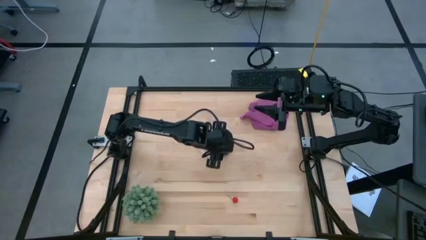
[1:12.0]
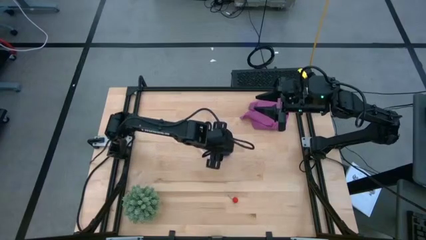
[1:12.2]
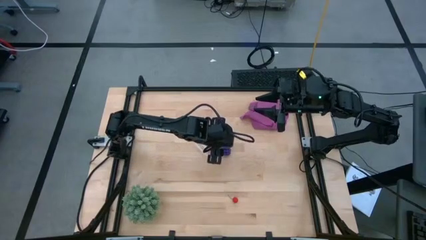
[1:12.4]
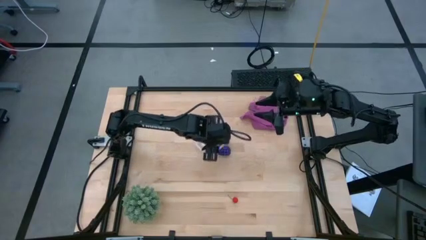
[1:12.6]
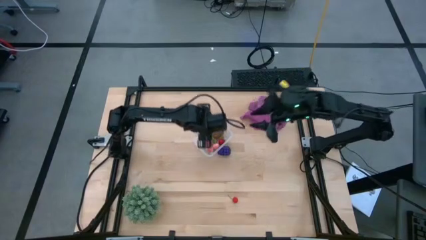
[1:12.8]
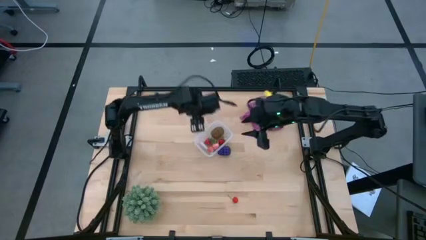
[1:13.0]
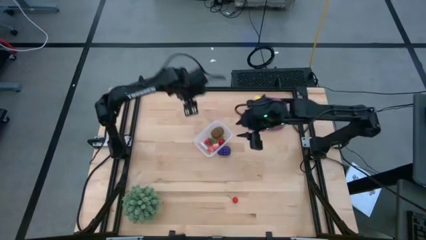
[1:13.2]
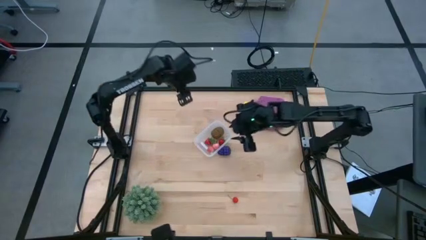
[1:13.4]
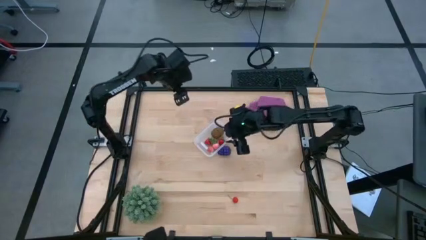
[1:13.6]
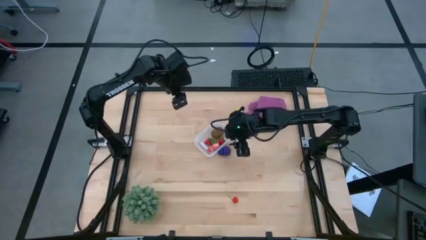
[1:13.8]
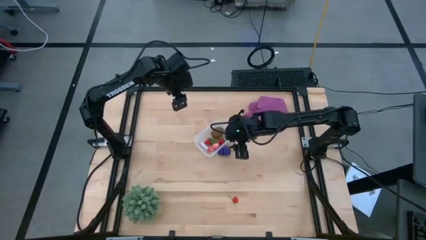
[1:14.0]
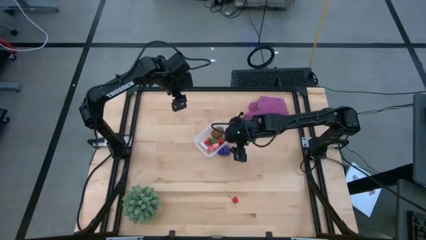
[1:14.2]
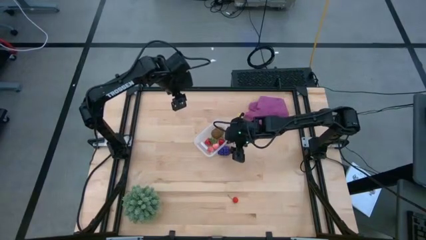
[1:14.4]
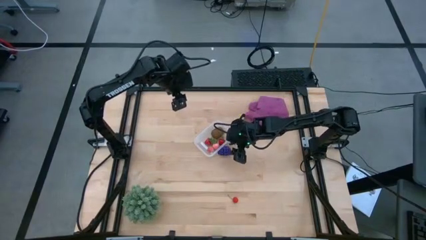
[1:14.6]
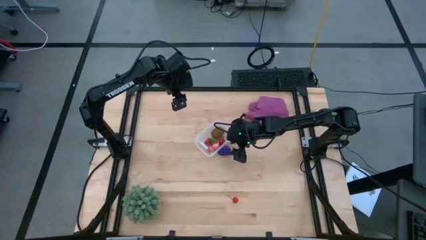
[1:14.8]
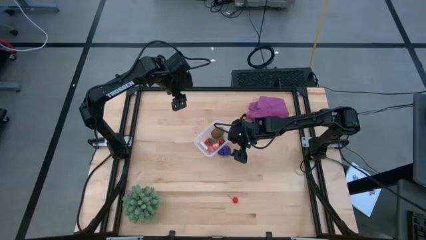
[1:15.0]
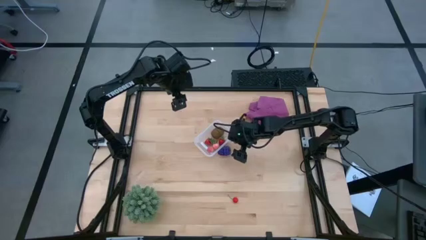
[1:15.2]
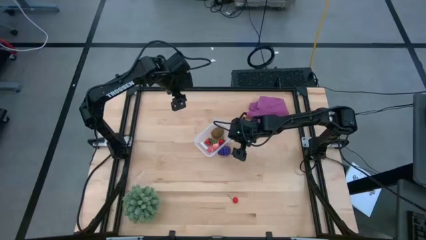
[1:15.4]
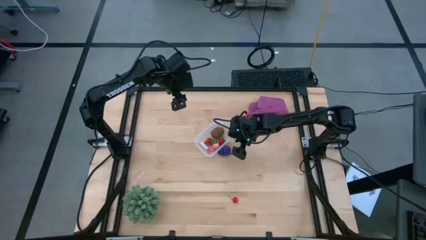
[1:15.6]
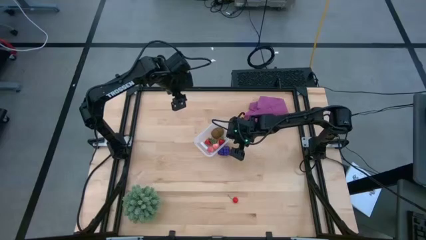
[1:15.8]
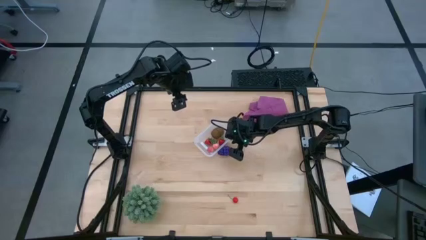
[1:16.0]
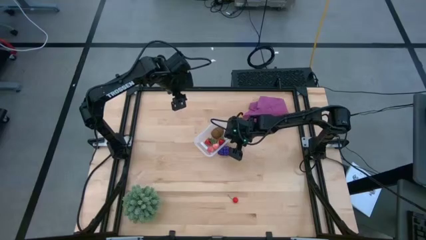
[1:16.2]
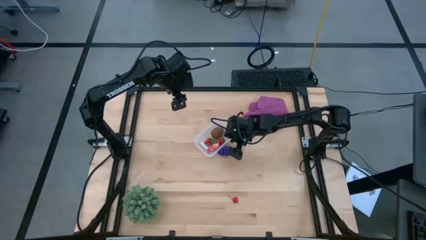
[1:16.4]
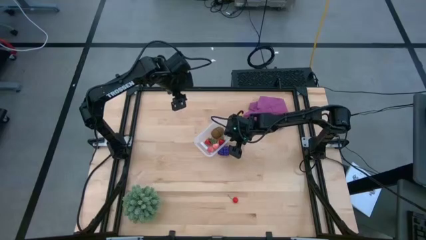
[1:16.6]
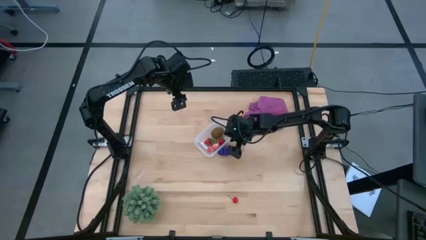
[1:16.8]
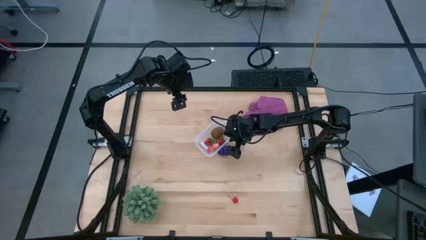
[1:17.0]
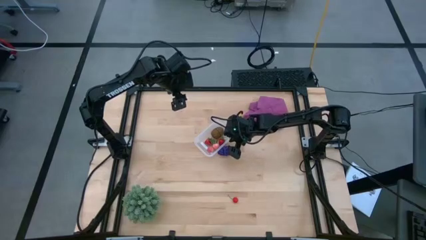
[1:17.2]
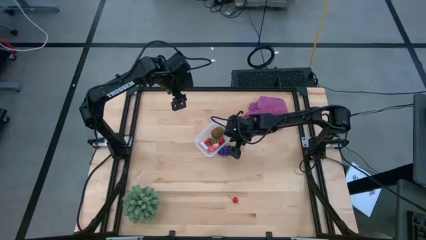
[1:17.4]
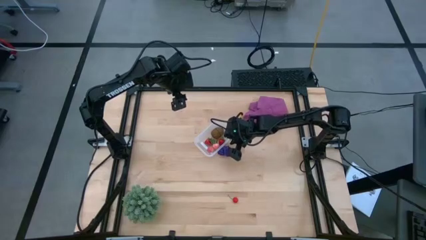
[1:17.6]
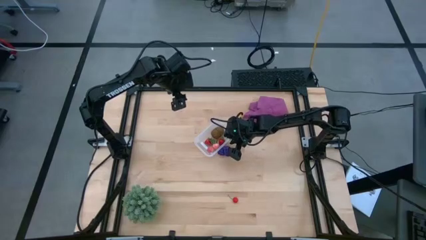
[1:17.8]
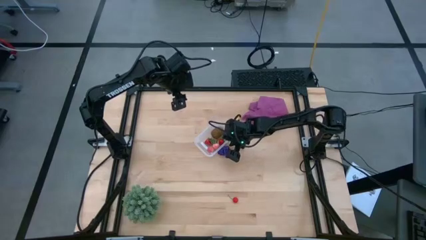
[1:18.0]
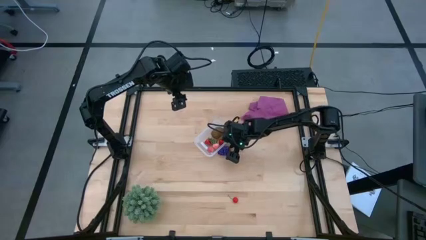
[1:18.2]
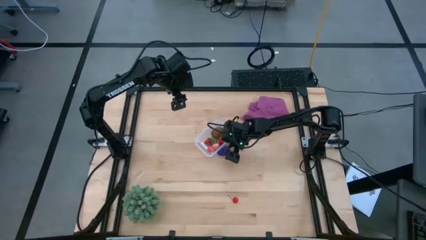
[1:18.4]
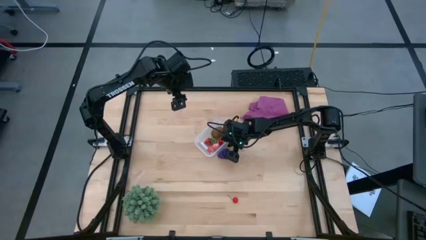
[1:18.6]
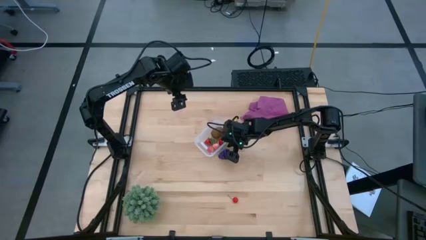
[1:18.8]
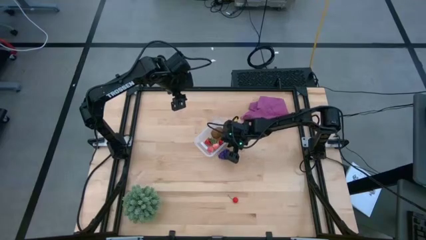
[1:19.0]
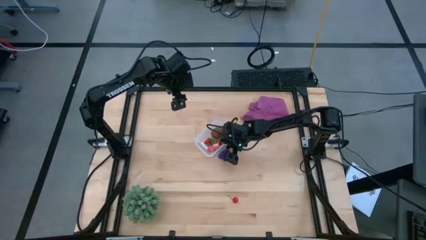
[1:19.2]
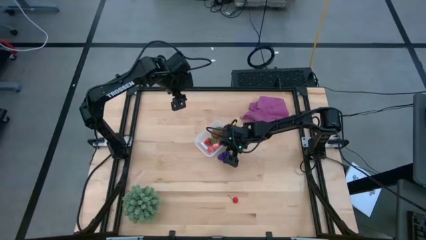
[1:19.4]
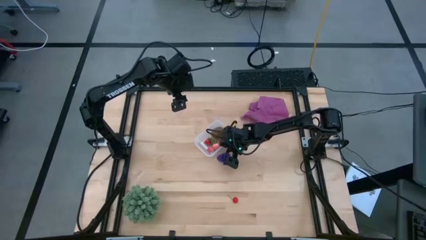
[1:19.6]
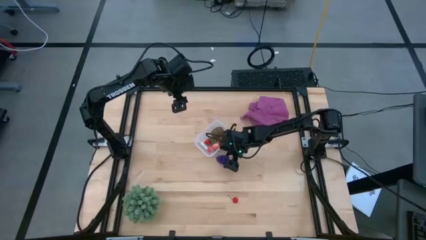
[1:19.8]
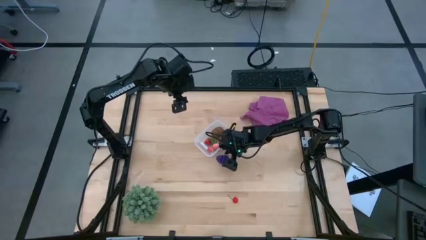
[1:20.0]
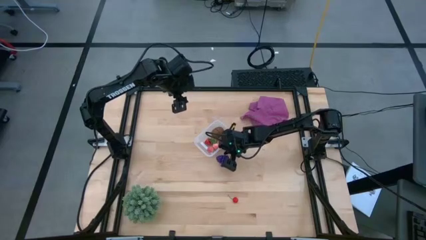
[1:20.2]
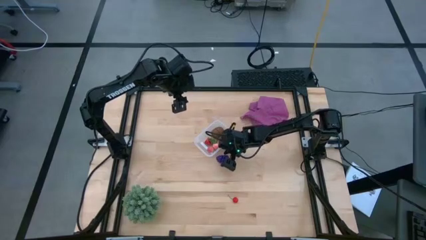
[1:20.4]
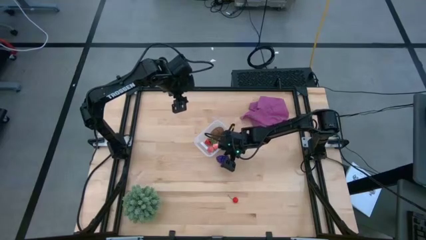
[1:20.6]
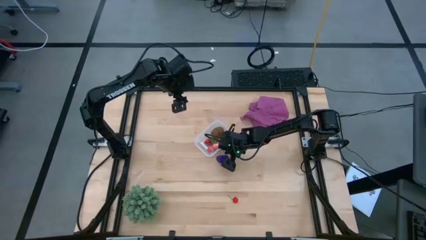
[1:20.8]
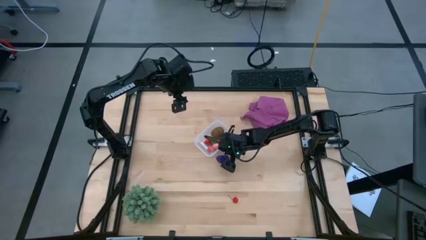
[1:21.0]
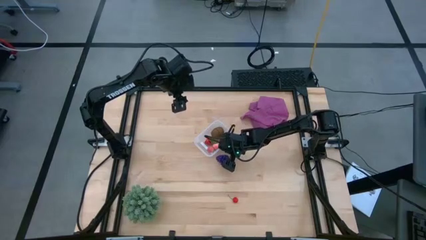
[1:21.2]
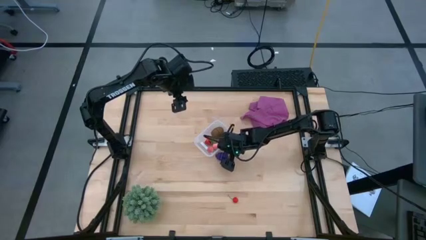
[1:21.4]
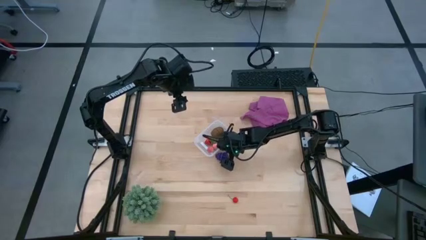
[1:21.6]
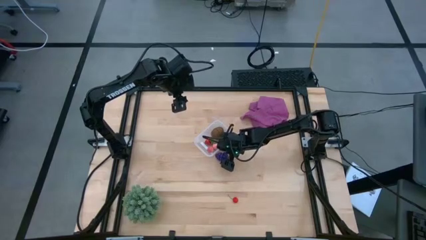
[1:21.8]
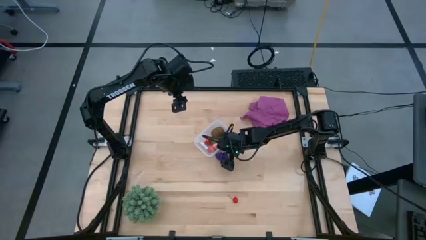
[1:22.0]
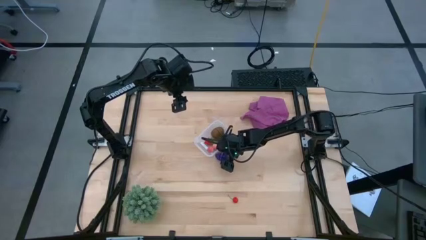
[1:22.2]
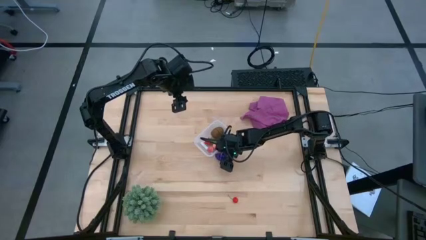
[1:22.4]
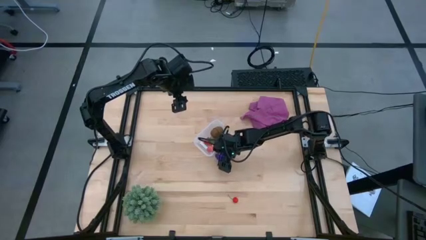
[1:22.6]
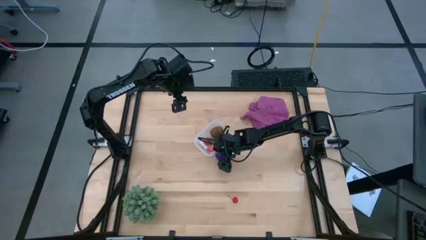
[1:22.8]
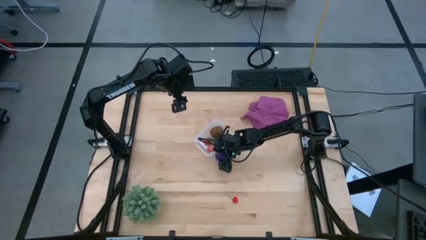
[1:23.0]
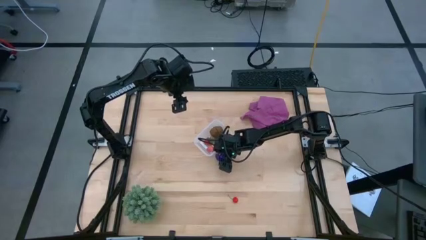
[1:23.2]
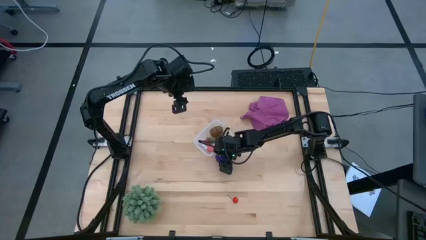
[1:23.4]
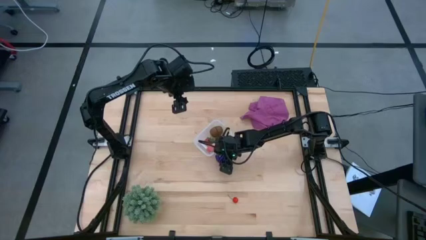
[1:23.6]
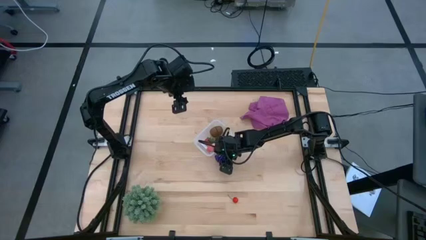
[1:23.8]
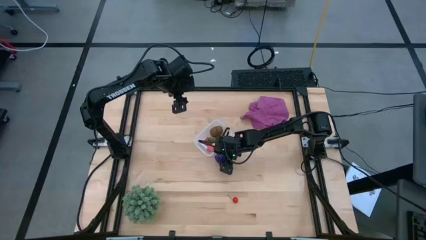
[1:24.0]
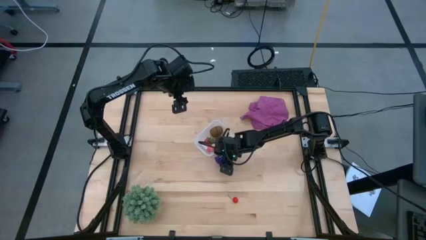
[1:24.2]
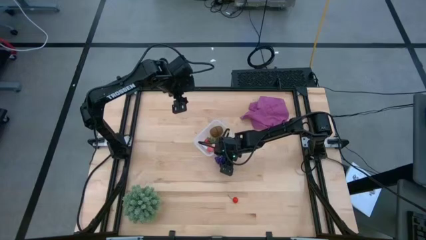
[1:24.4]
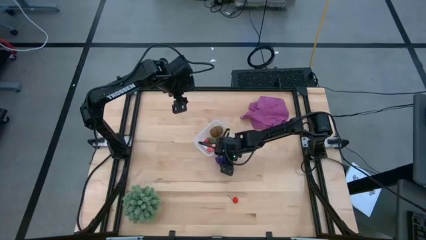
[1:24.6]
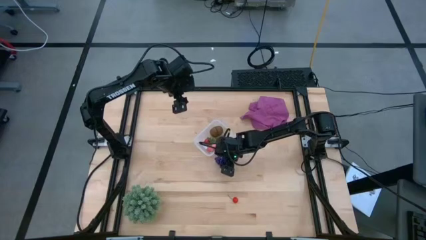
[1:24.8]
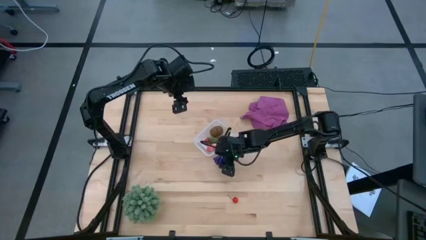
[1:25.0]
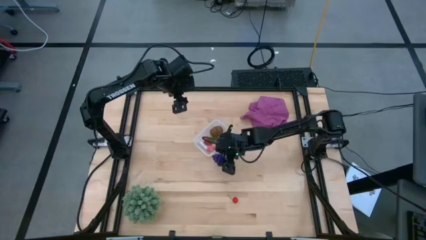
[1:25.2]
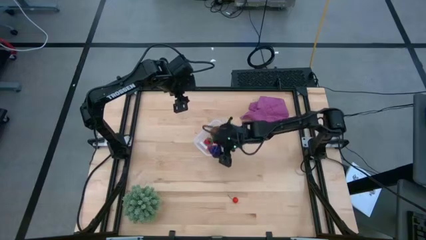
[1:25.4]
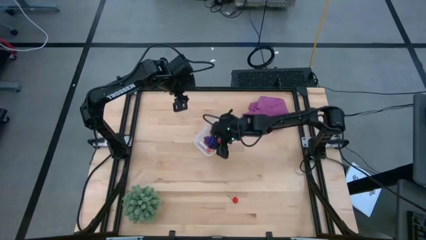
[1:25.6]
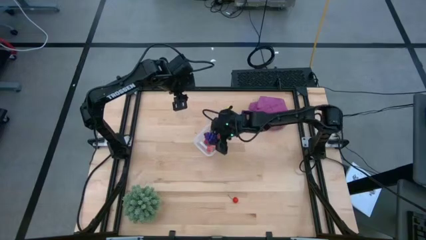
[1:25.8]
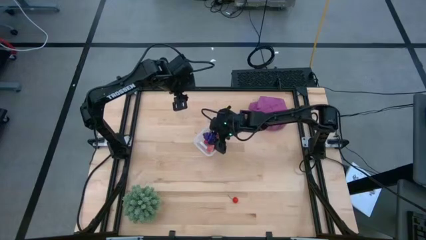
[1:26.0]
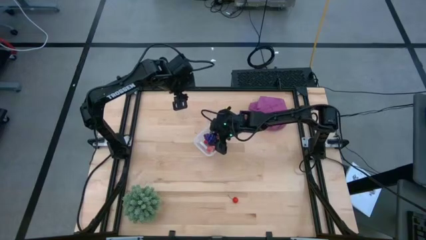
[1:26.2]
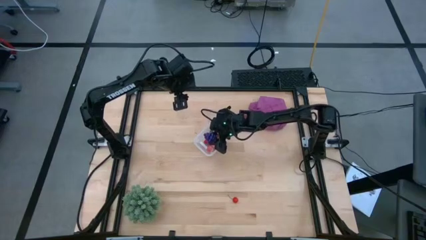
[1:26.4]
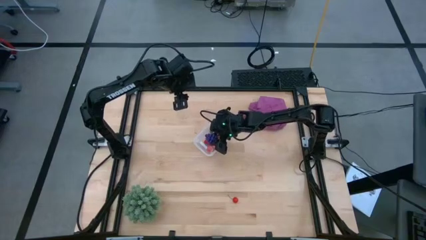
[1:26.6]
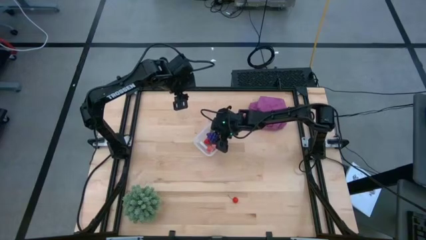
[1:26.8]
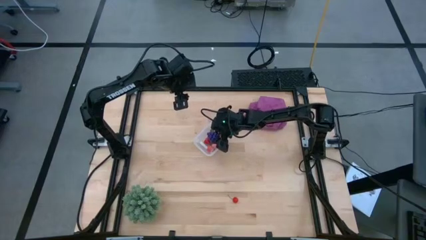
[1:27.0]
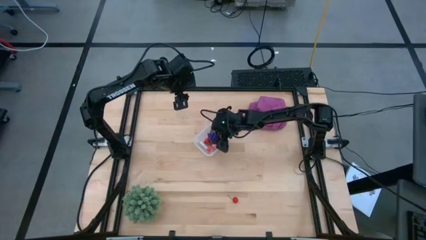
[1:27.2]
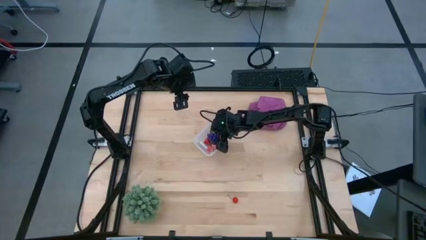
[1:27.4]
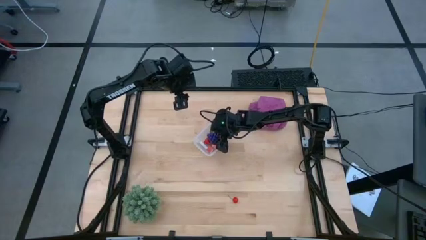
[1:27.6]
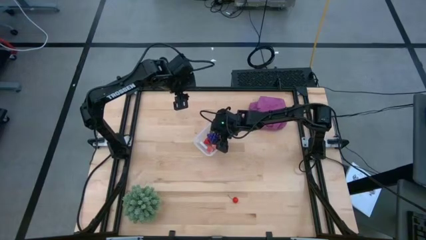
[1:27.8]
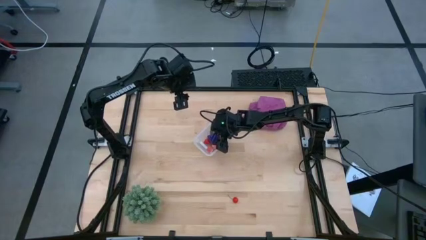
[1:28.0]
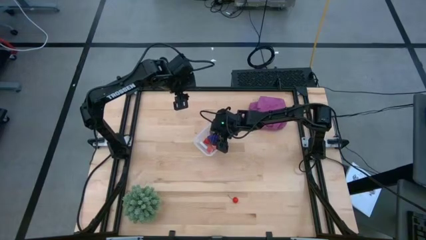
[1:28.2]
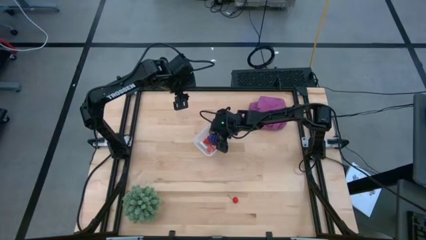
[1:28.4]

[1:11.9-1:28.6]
Task: Pick and placing Produce into tupperware
Put the blue raspberry into the transparent bin
